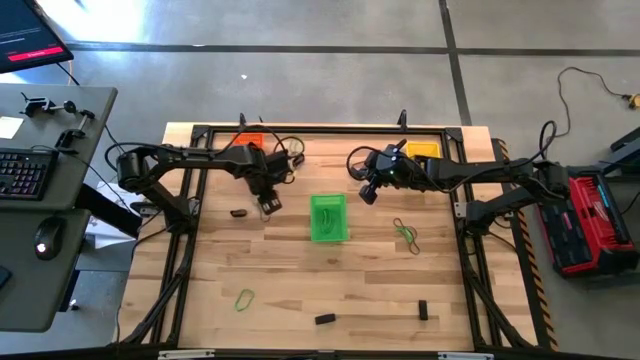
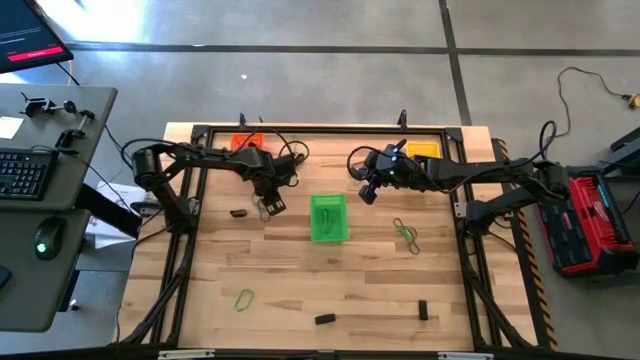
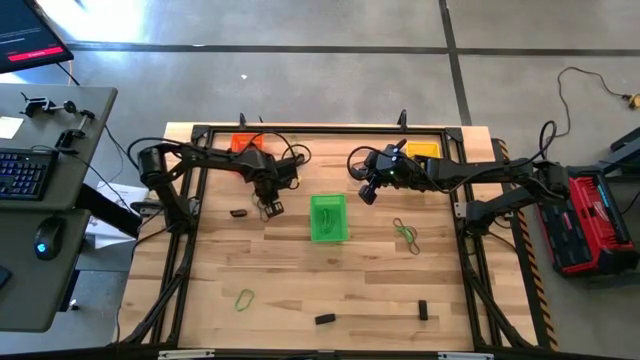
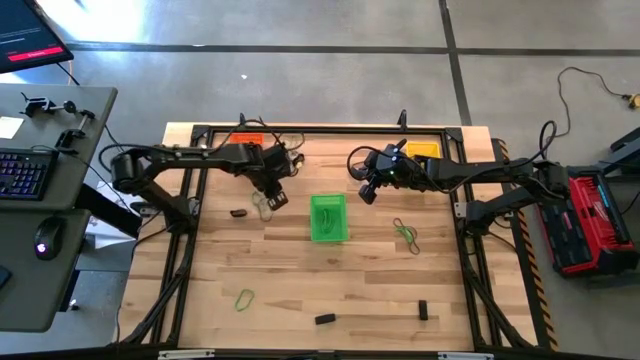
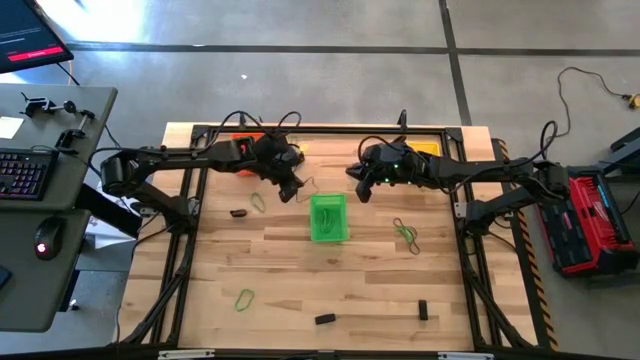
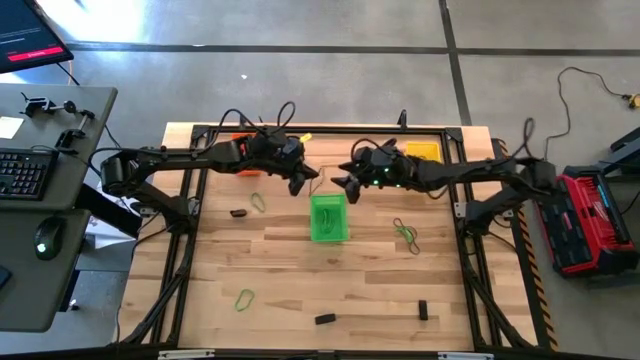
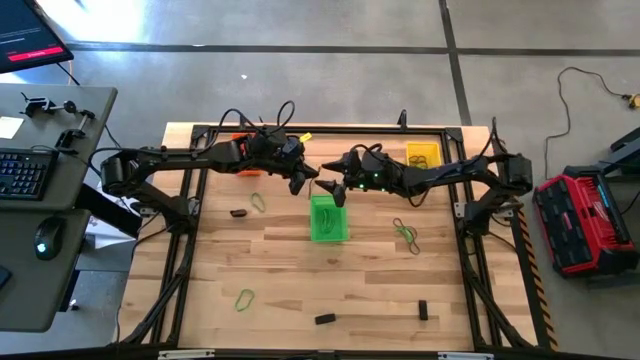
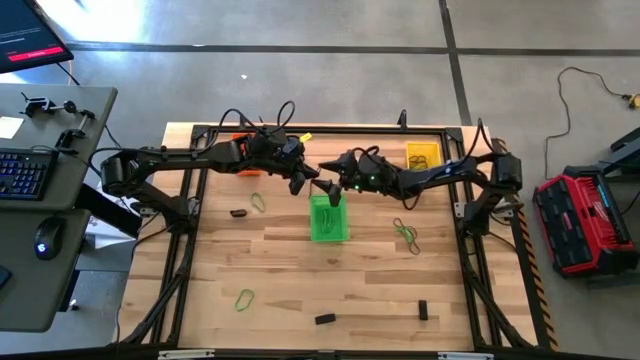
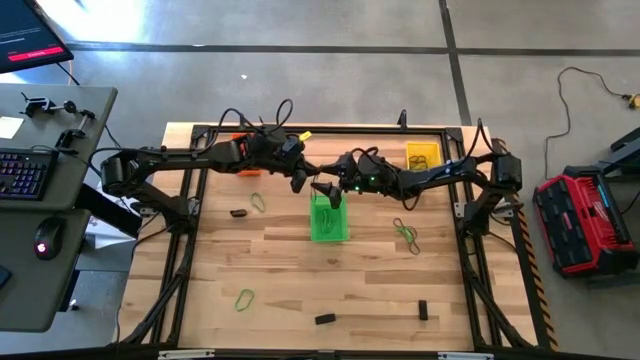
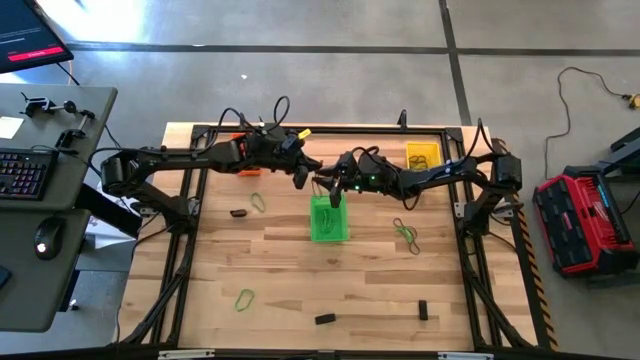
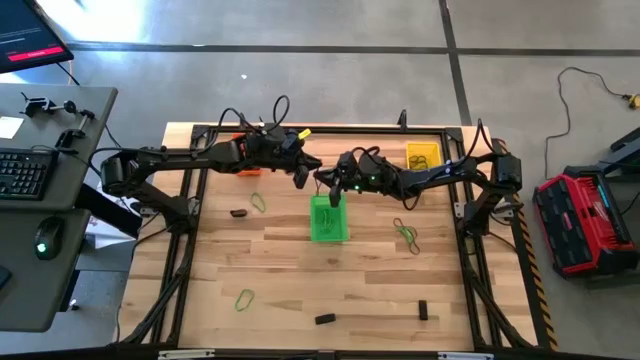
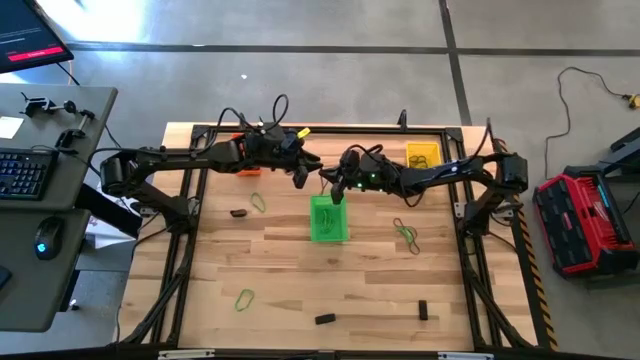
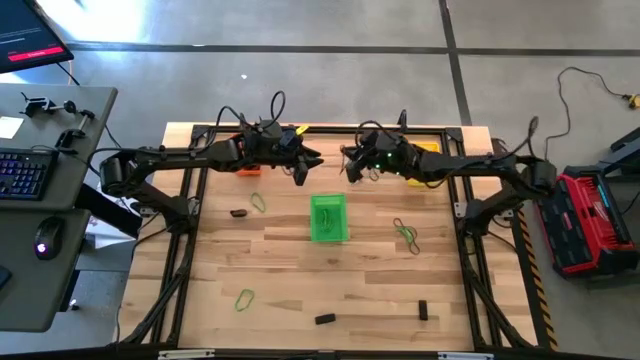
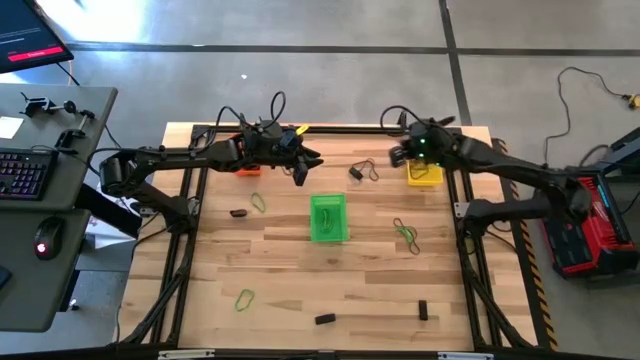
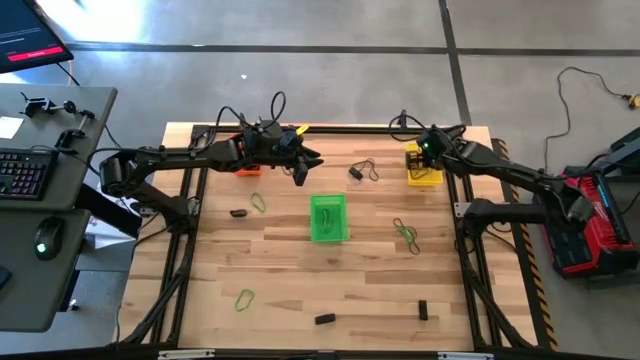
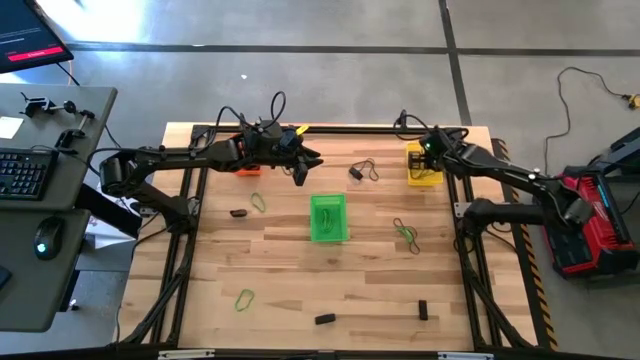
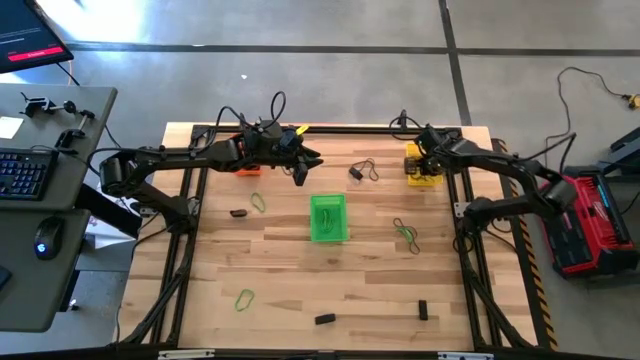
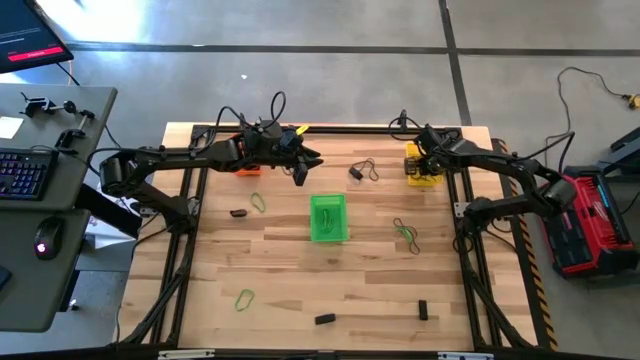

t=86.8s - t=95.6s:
Task: Sort rubber bands into baskets
Put the purple rubber band into the yellow bin

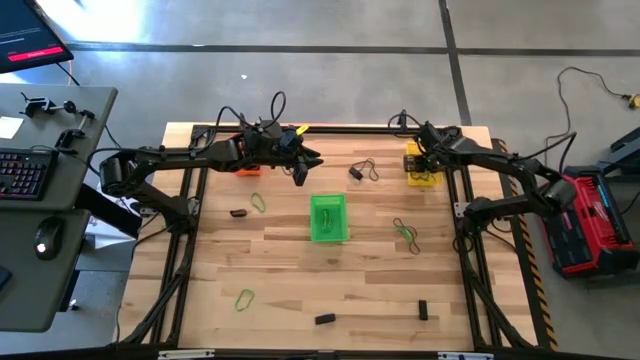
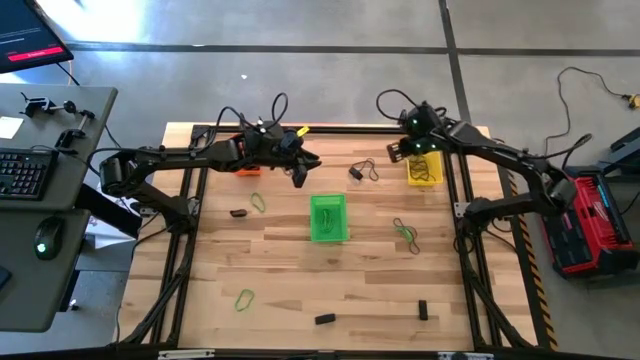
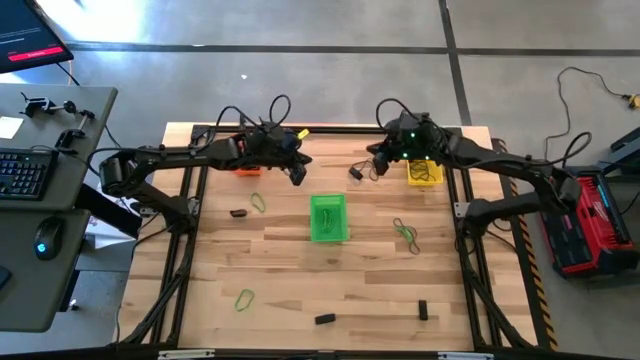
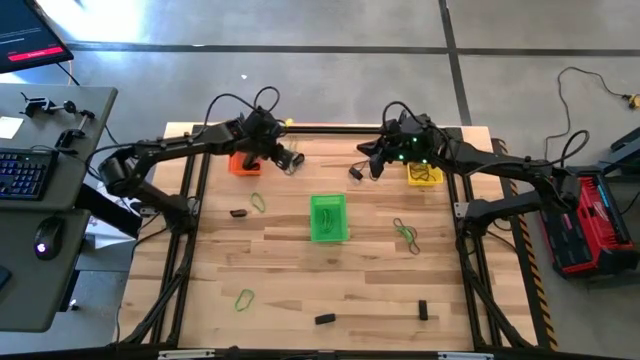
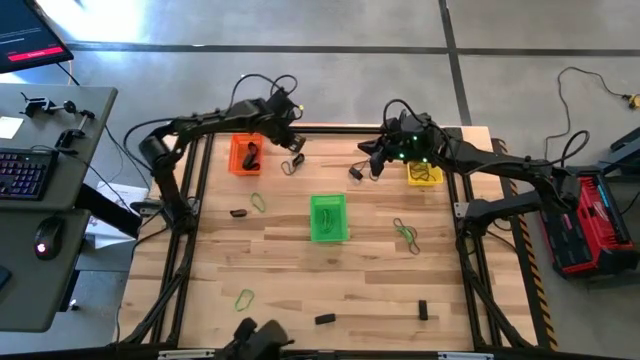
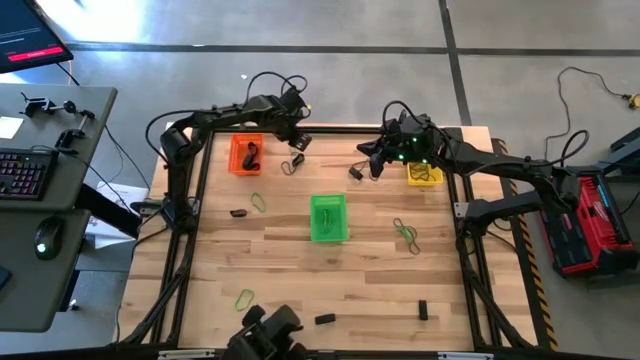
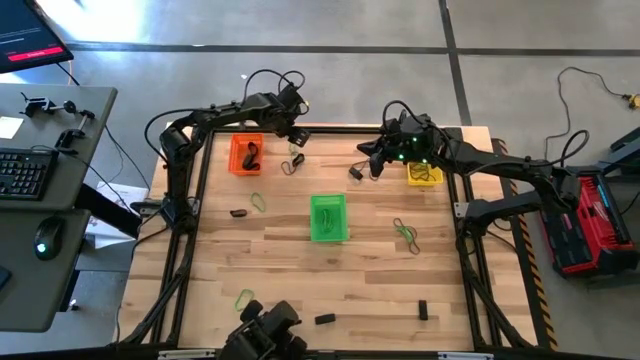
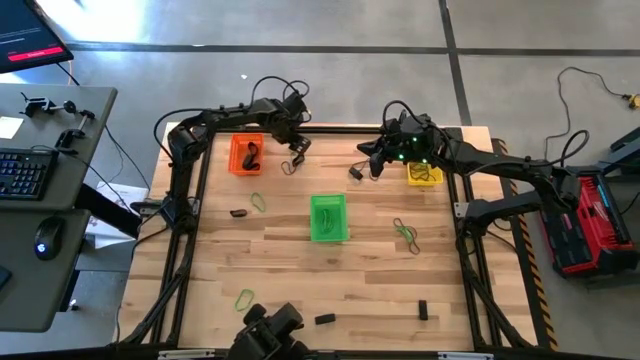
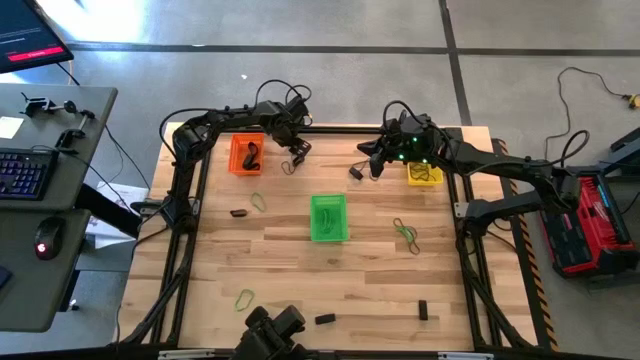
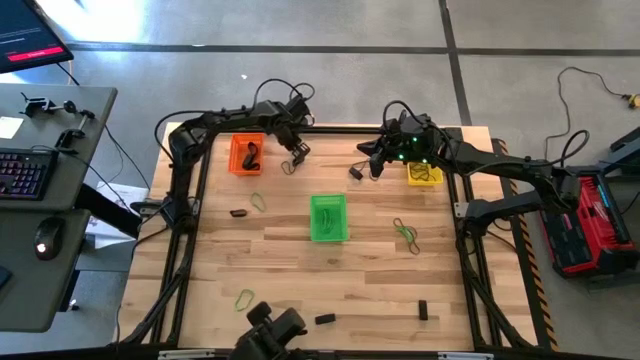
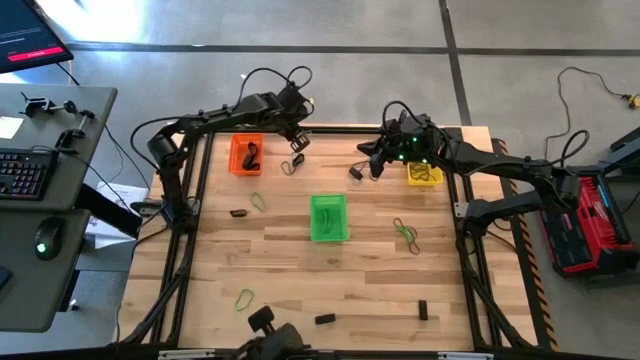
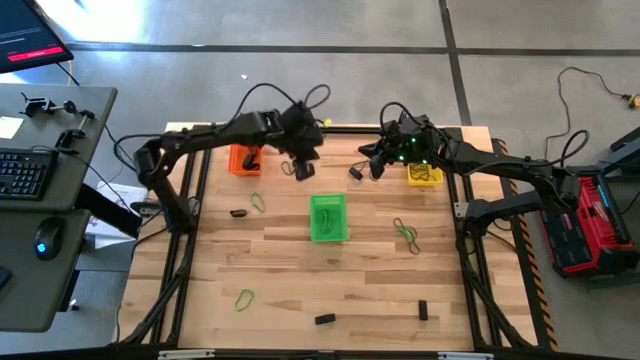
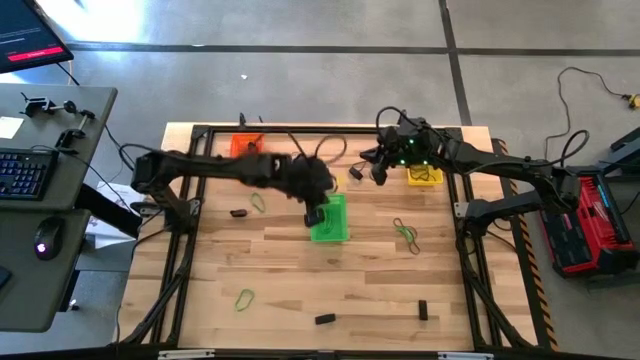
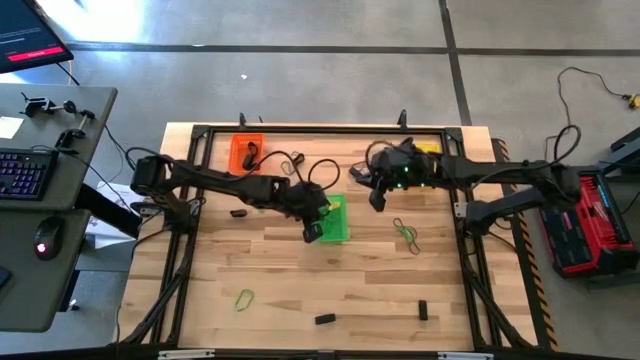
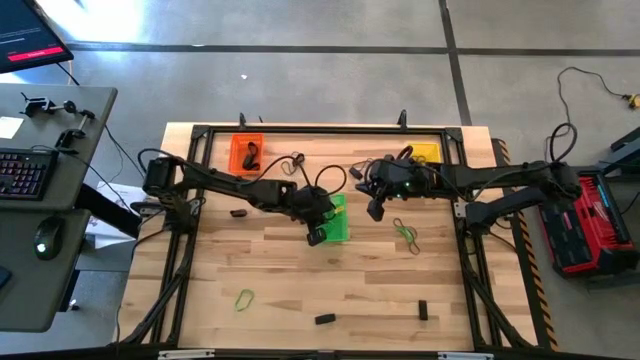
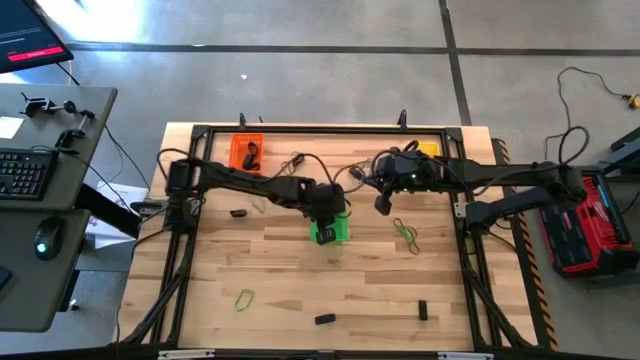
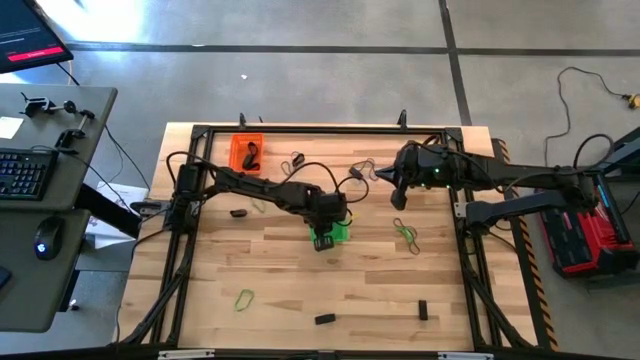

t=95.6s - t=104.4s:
Put the green rubber band into the green bin

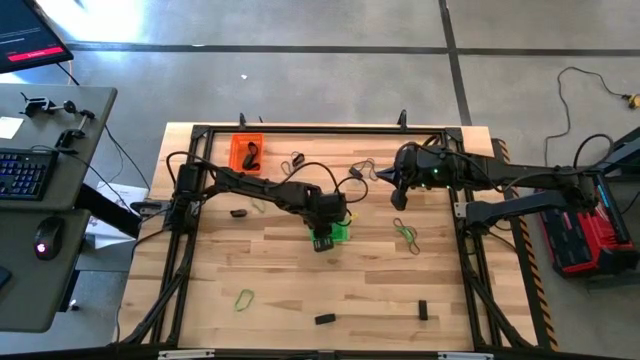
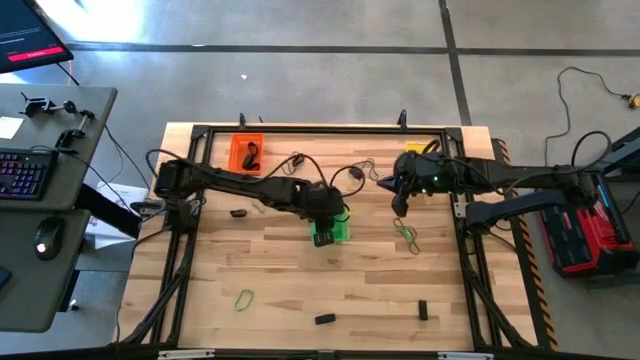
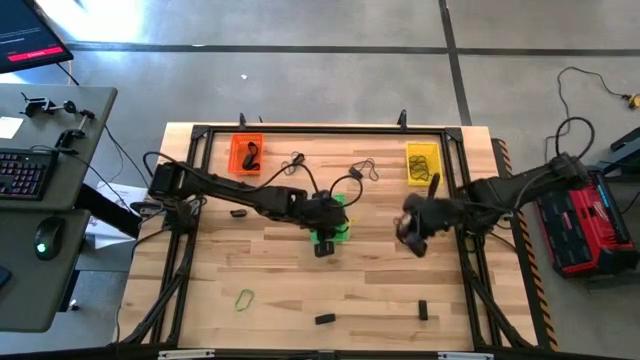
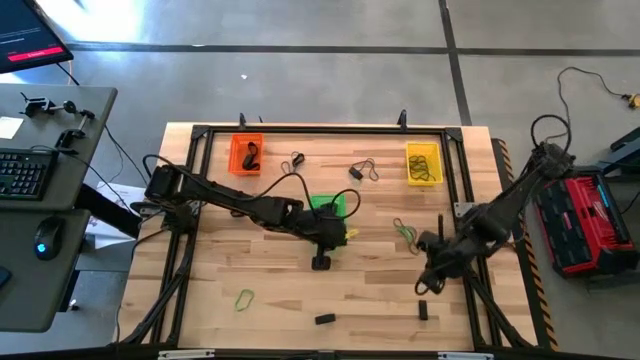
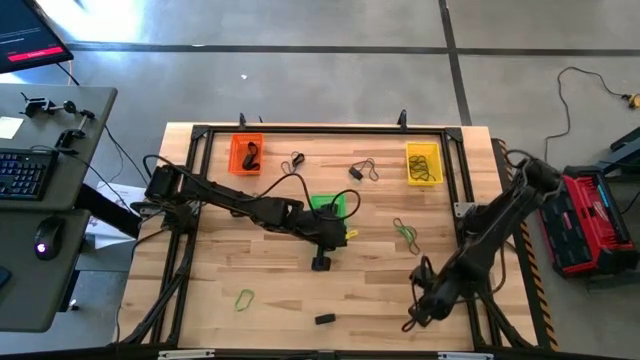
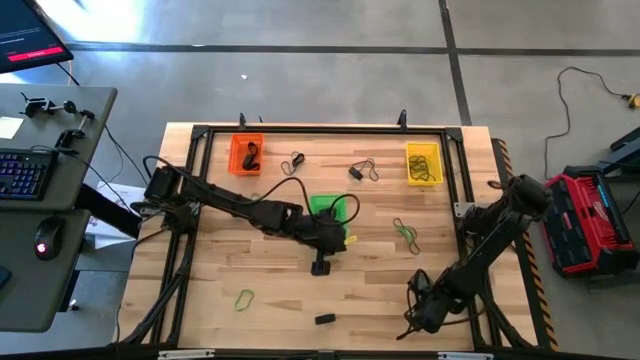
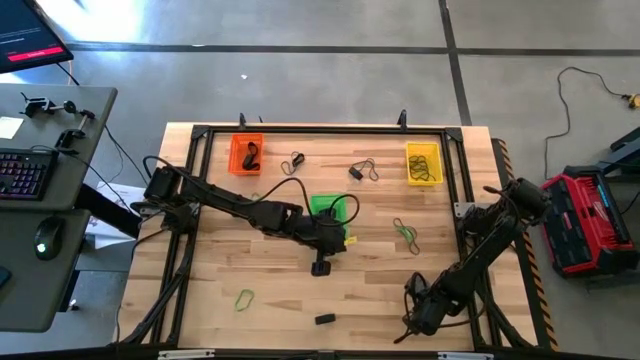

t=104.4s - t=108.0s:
Put the black rubberband into the orange bin
